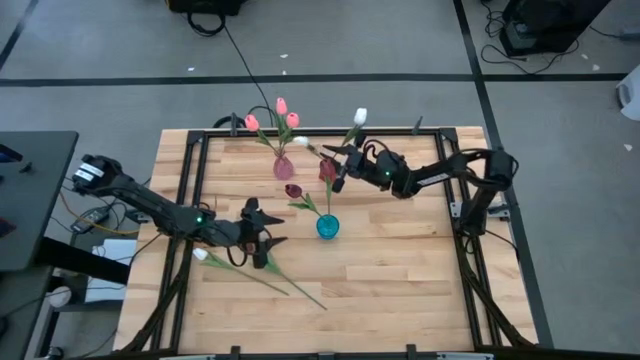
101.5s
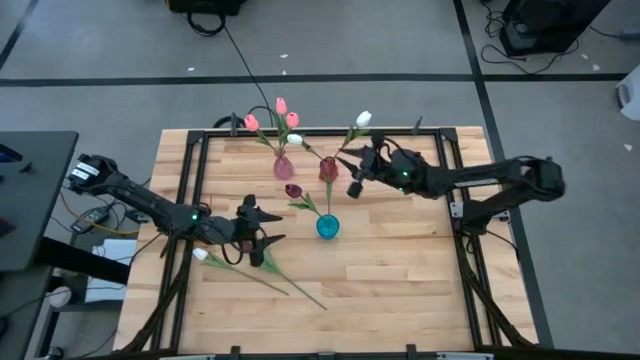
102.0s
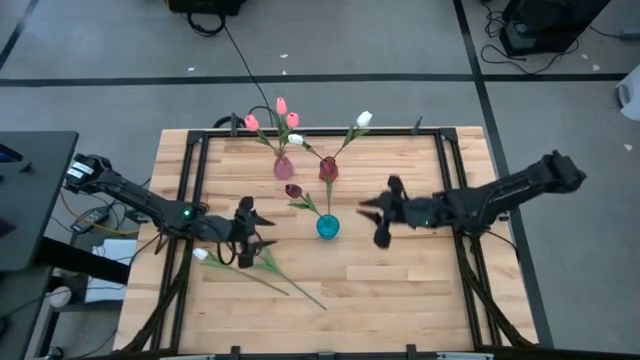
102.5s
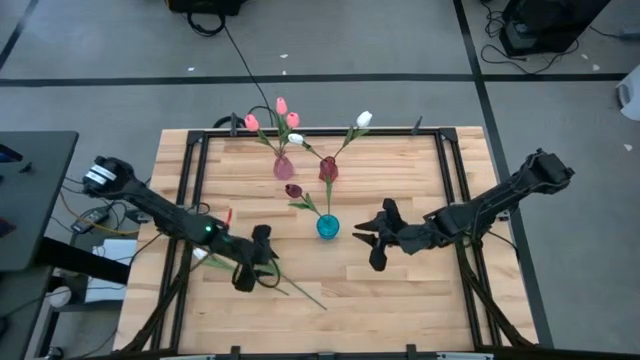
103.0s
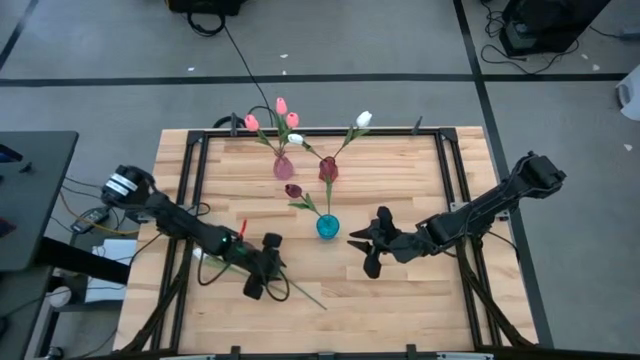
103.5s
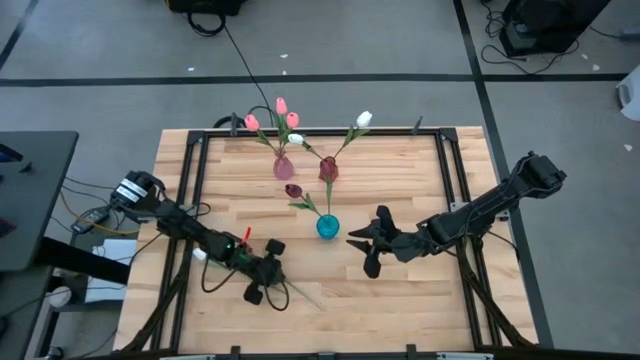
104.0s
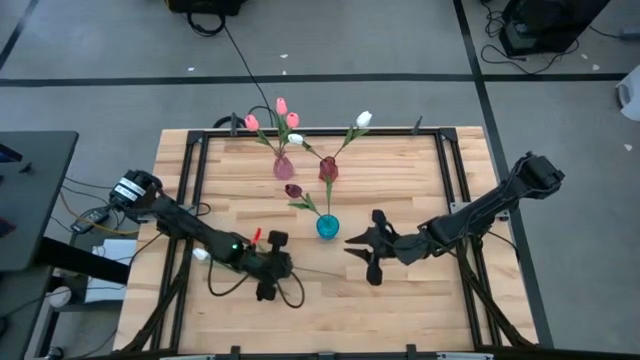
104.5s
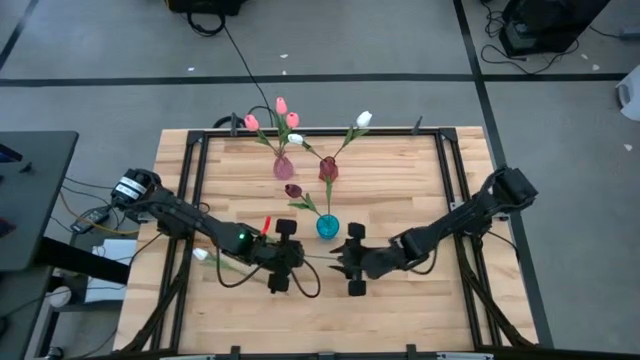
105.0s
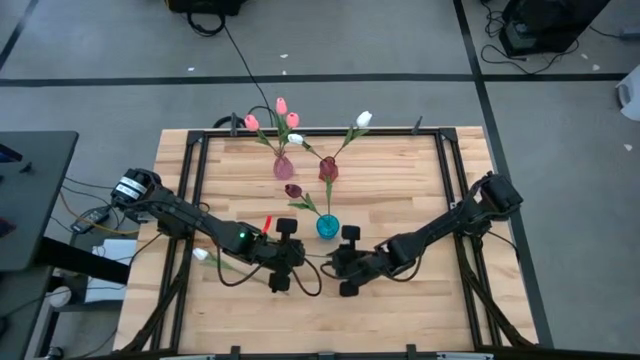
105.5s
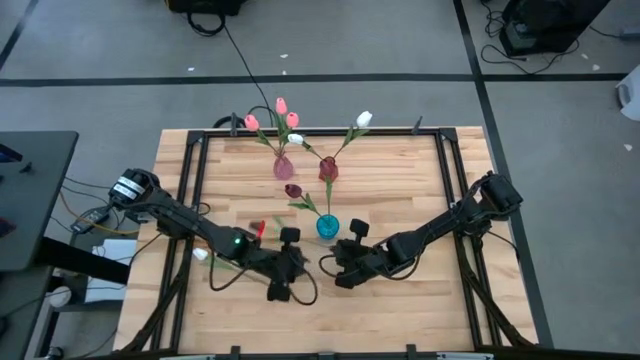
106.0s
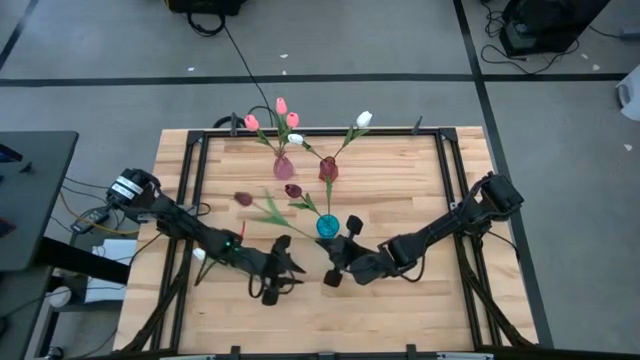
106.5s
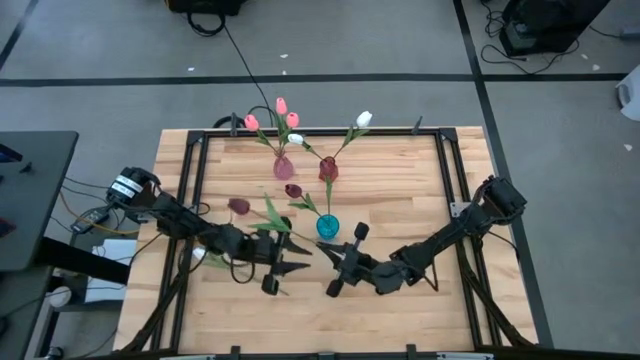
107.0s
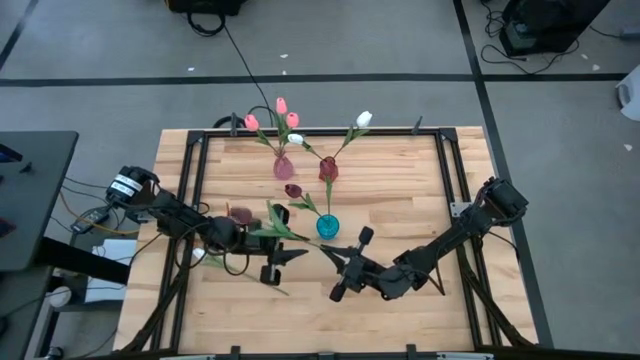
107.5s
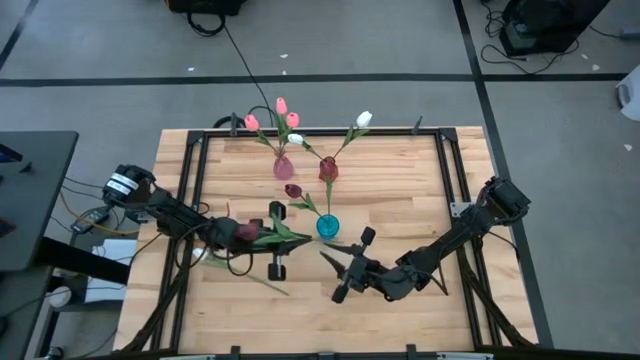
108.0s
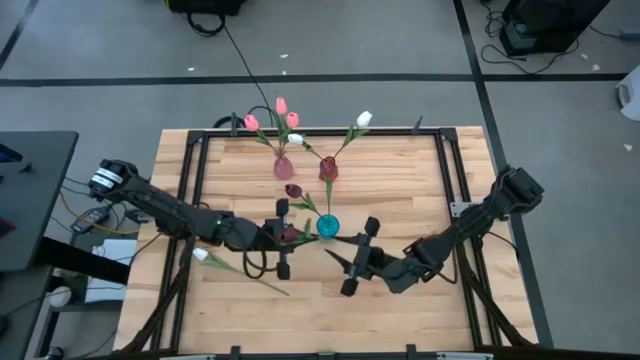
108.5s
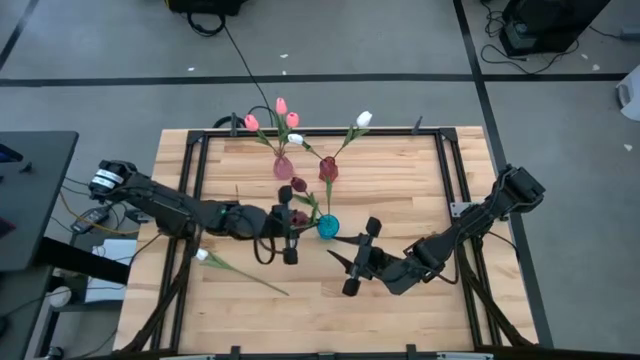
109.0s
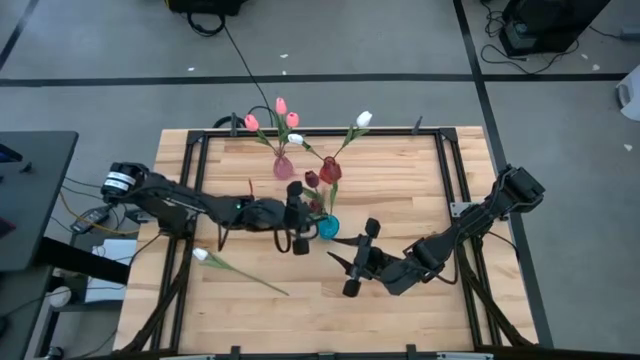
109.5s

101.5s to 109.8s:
Task: Sort flowers into vase by color
Put the red flower into the blue vase

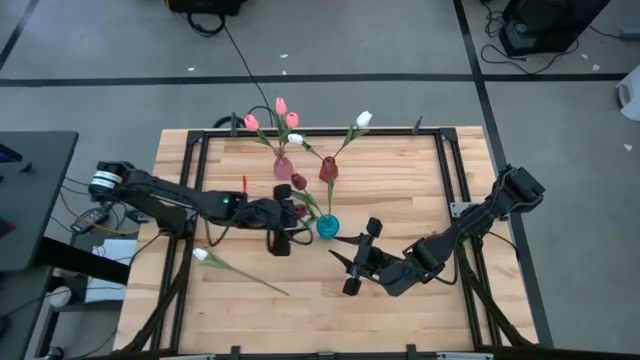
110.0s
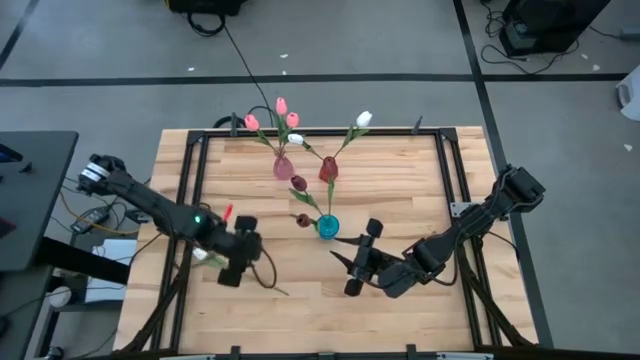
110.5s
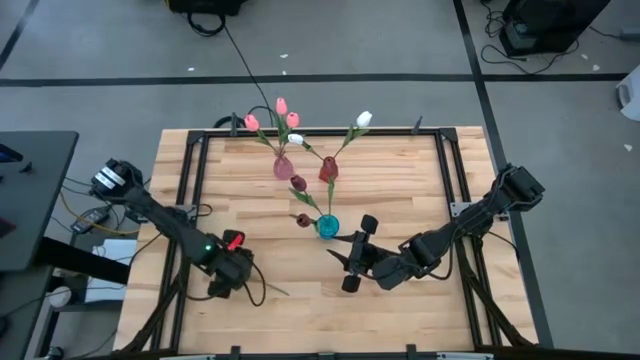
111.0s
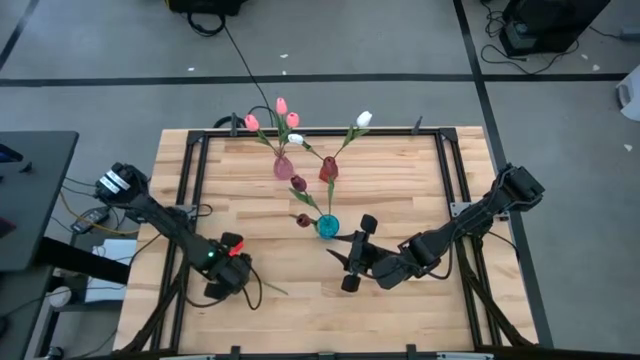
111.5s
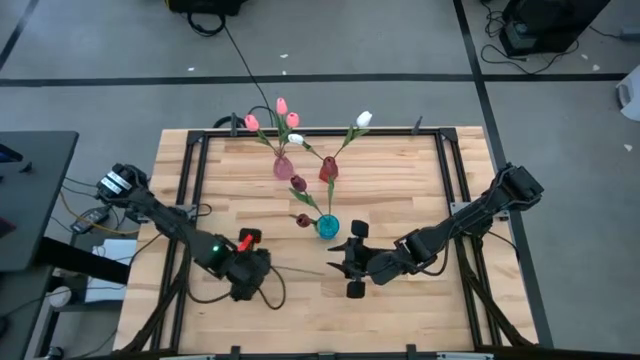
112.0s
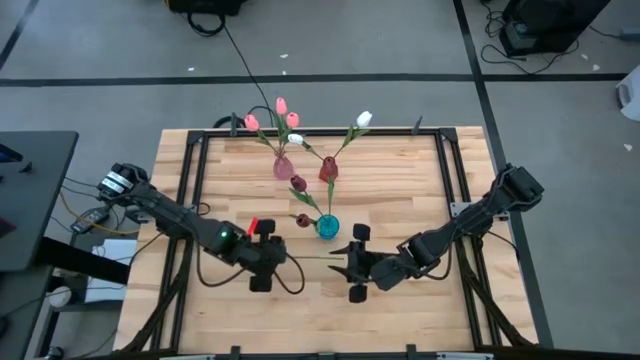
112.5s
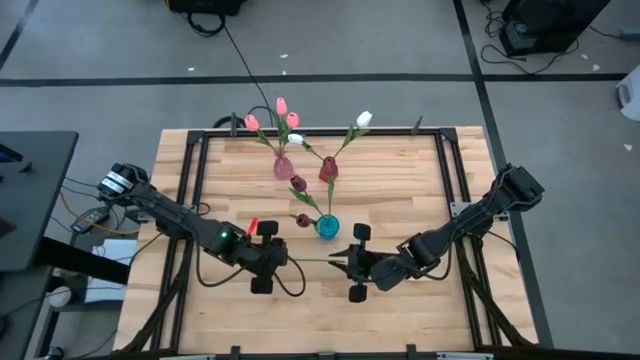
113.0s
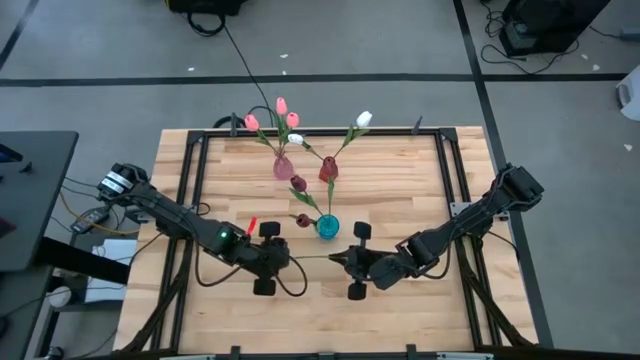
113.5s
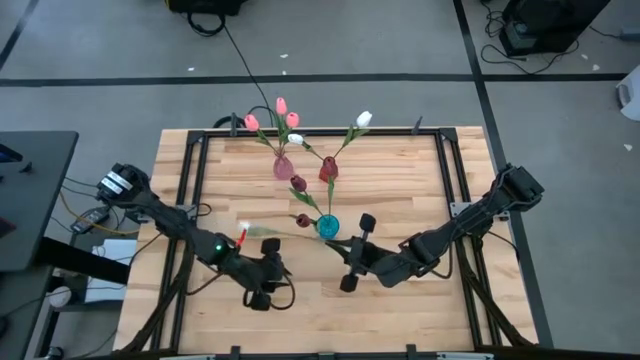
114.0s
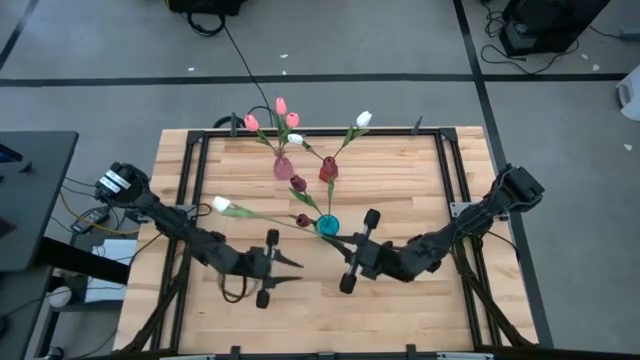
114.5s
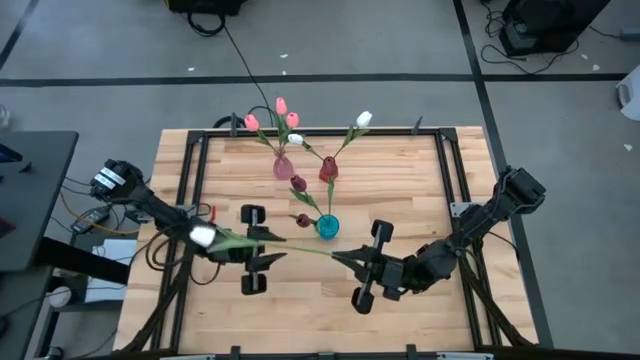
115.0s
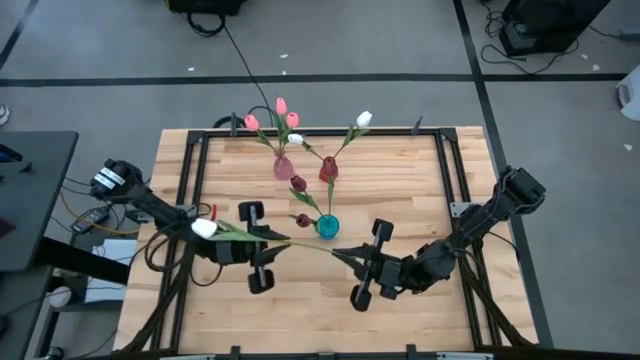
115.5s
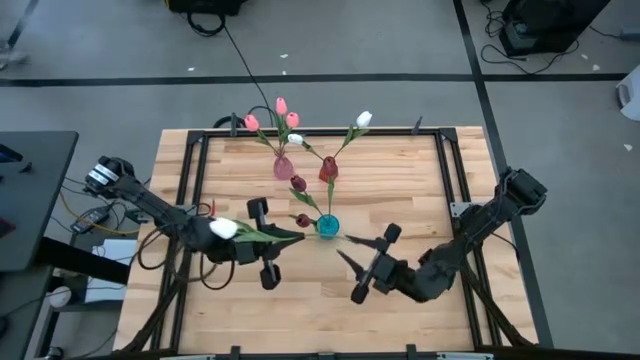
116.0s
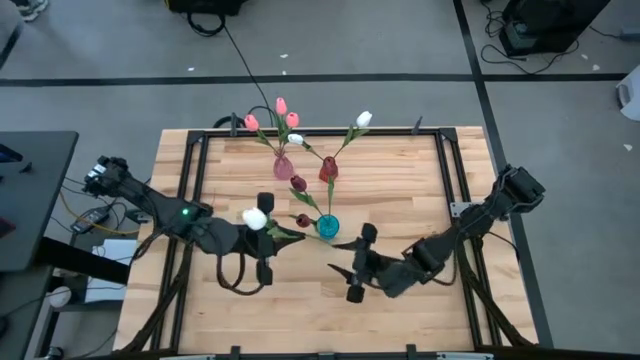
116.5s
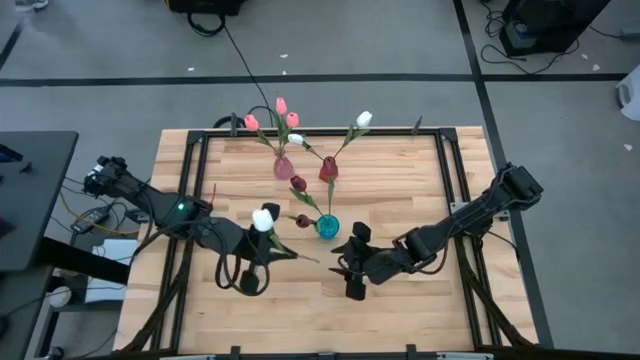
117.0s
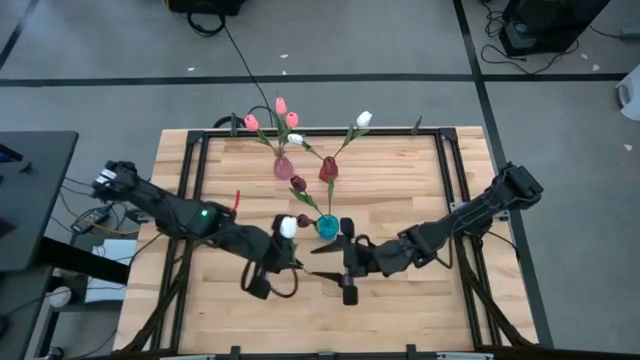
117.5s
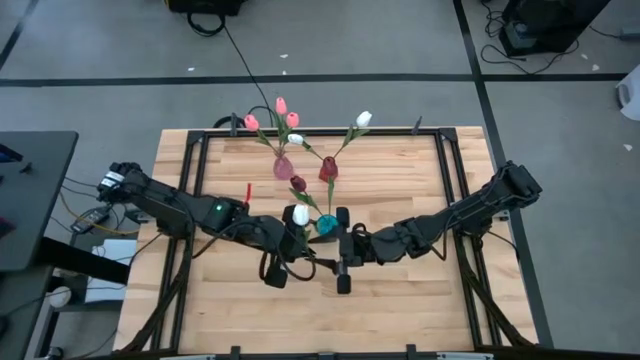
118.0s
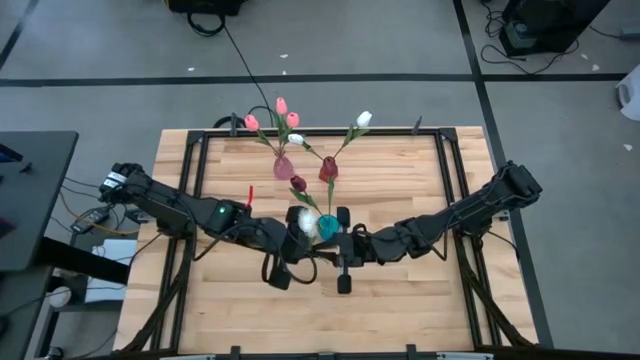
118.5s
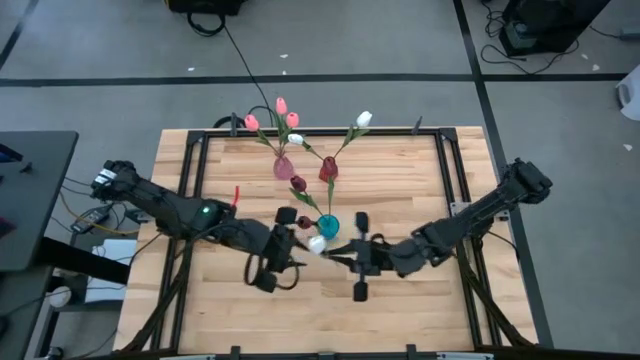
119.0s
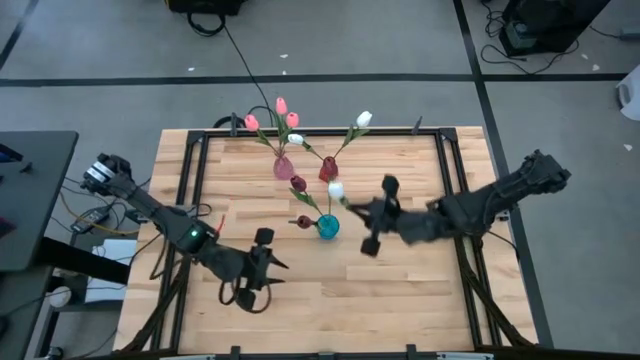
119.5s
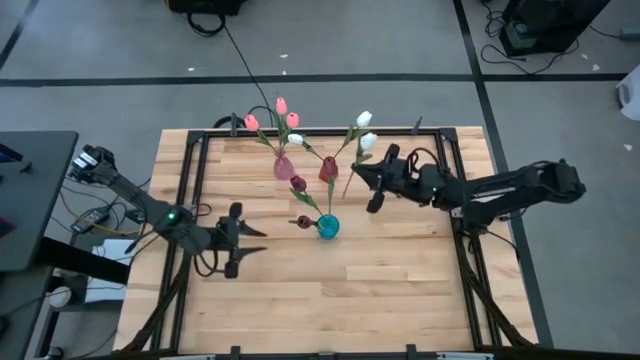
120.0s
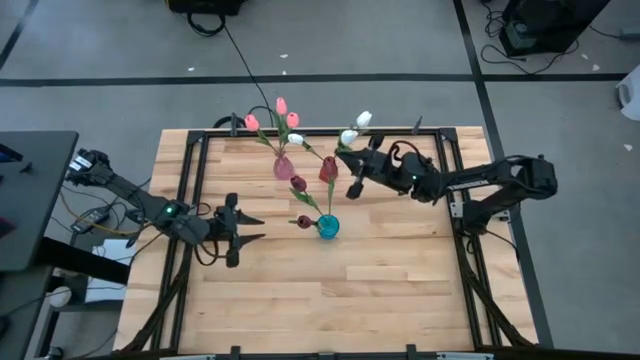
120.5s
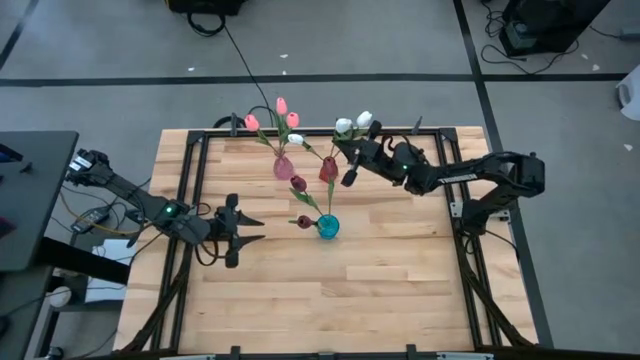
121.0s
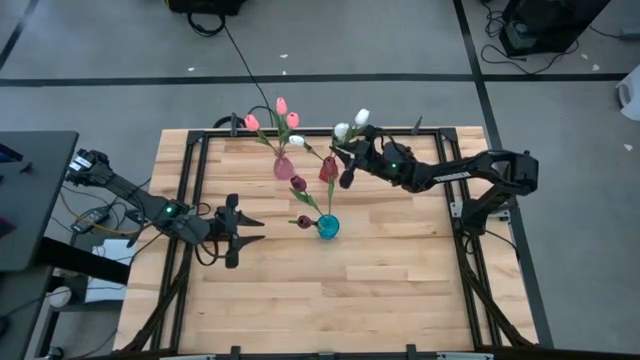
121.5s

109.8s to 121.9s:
Put the white flower into the red vase

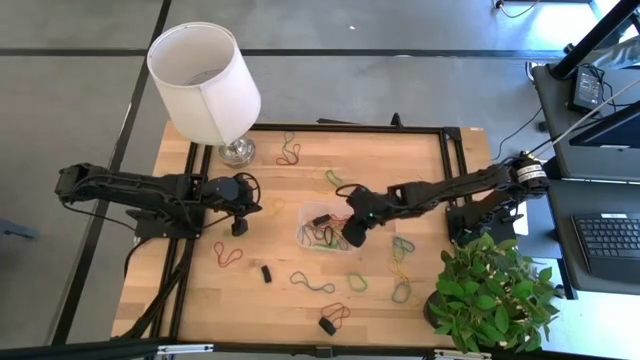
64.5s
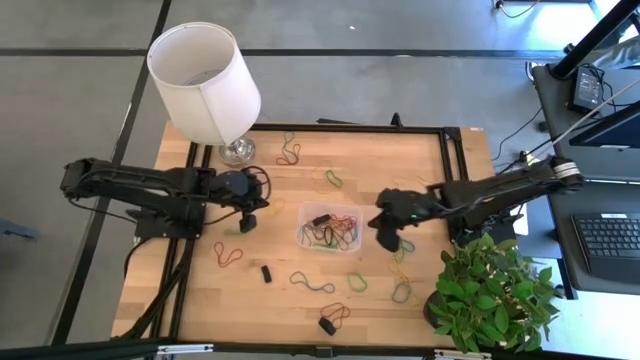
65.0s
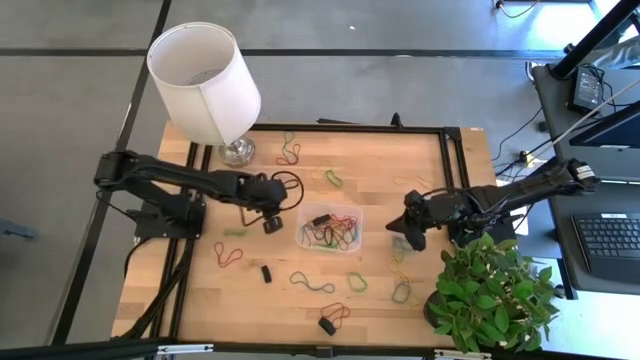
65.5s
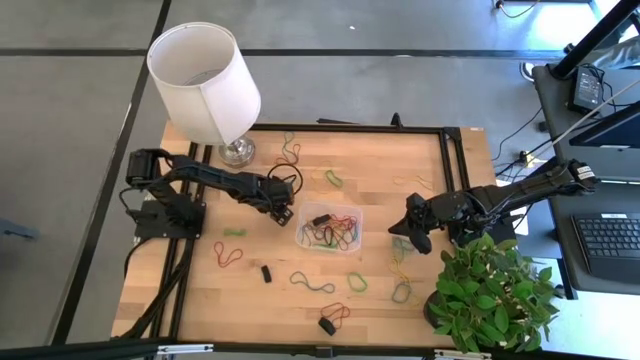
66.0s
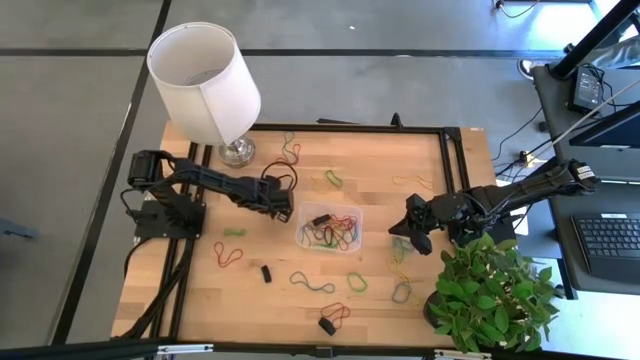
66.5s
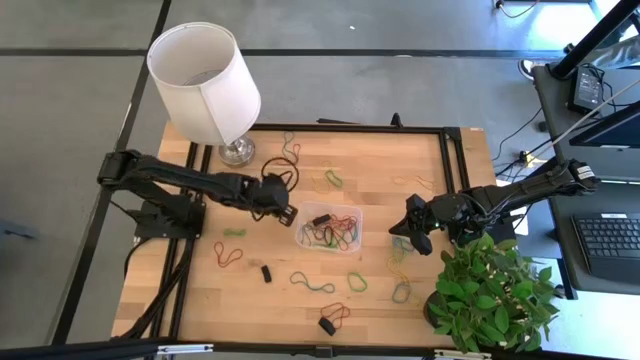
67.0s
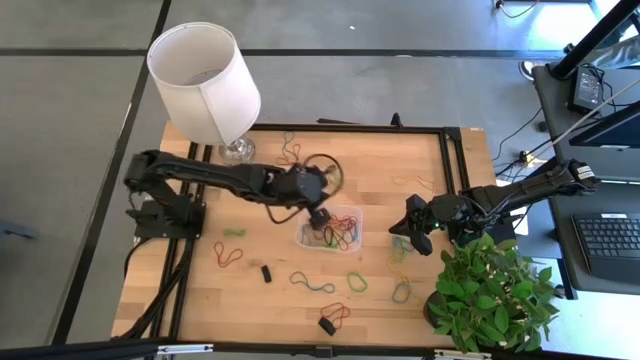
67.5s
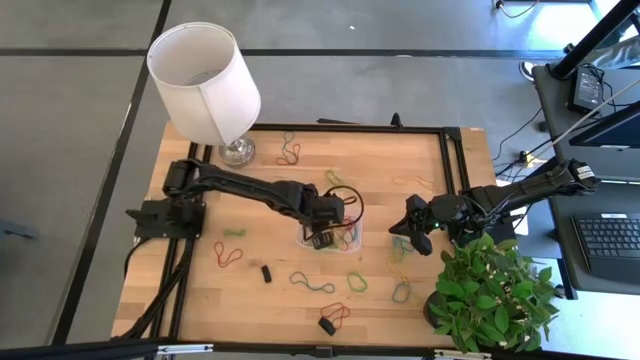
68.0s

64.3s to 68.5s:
Task: Pick and place rubber bands into bin
Put the yellow rubber band into the transparent bin
